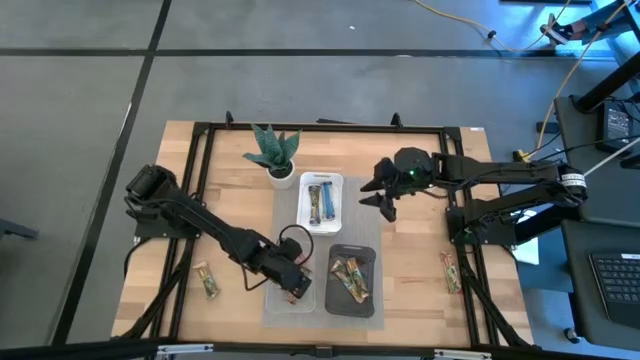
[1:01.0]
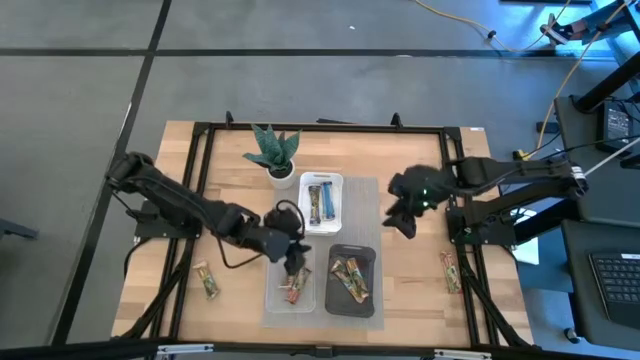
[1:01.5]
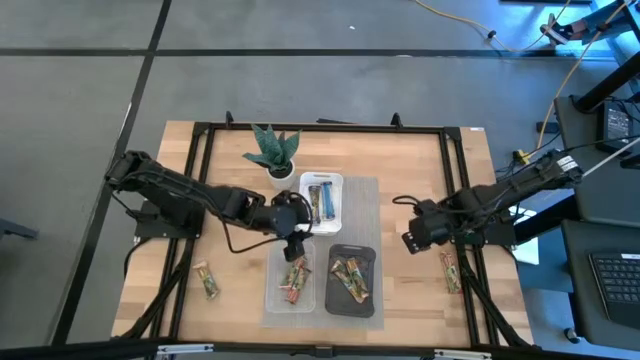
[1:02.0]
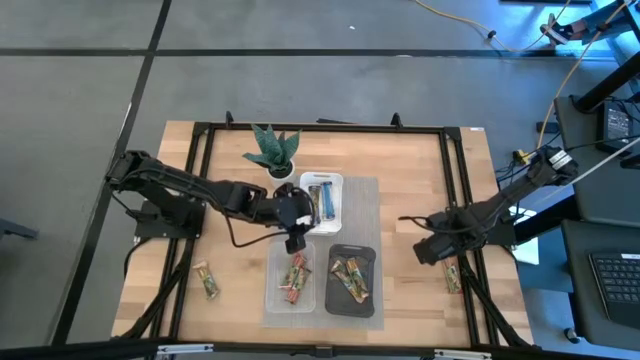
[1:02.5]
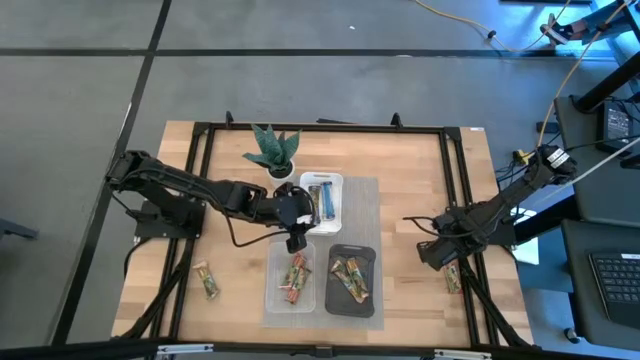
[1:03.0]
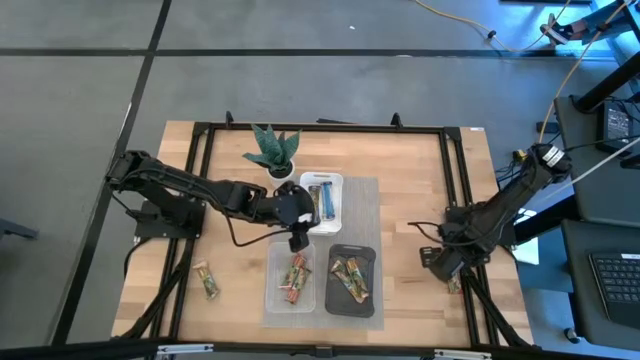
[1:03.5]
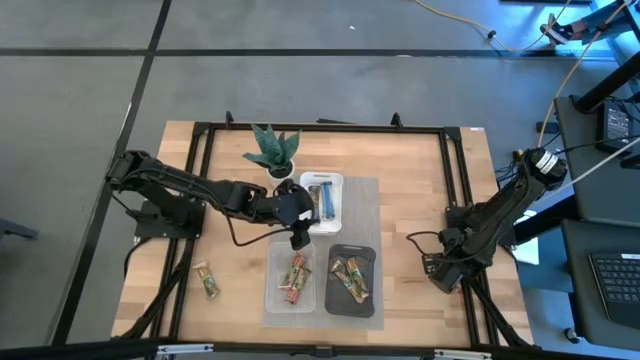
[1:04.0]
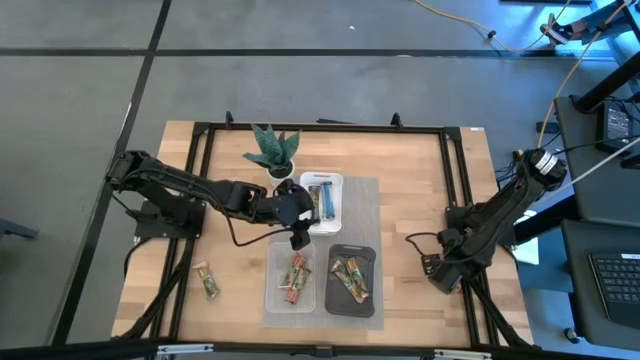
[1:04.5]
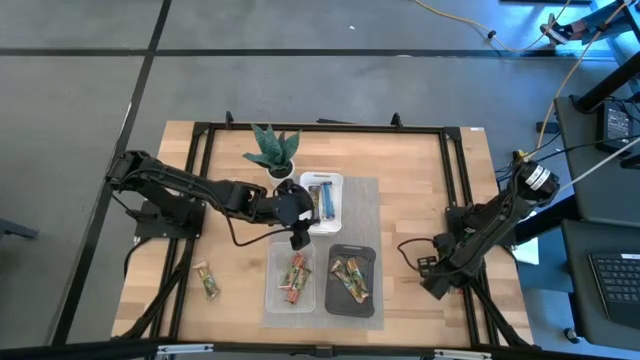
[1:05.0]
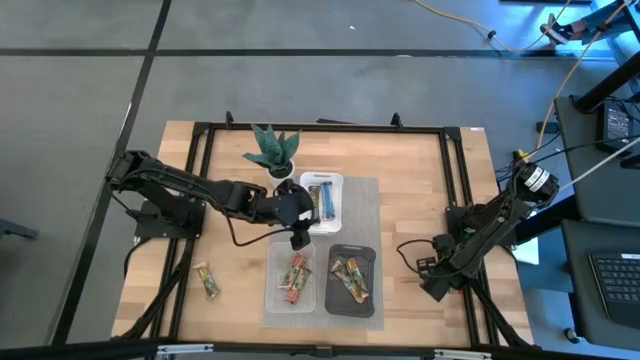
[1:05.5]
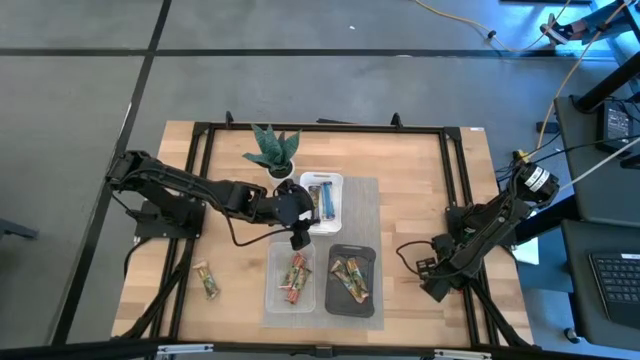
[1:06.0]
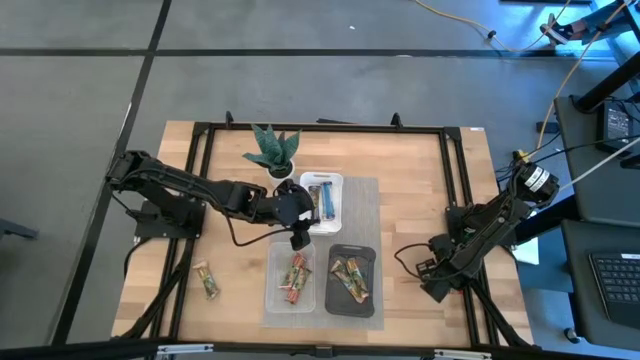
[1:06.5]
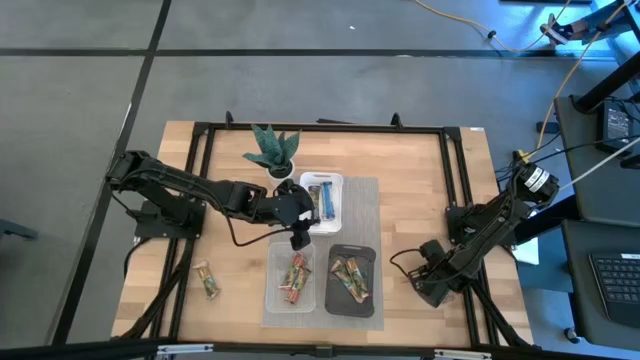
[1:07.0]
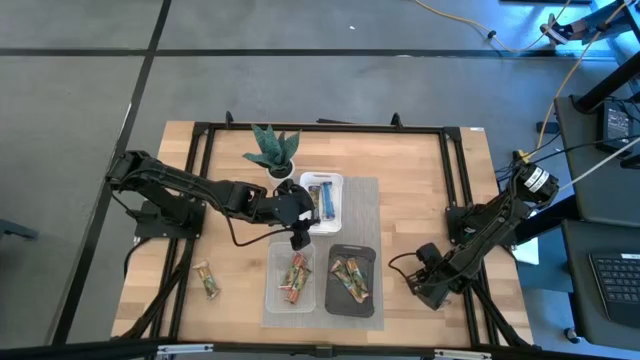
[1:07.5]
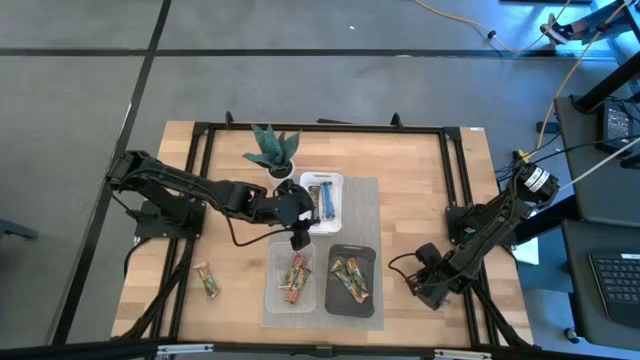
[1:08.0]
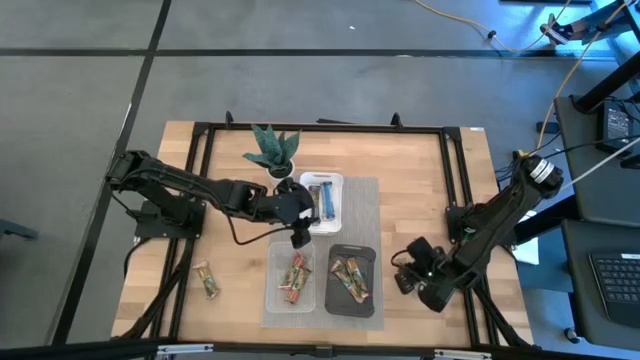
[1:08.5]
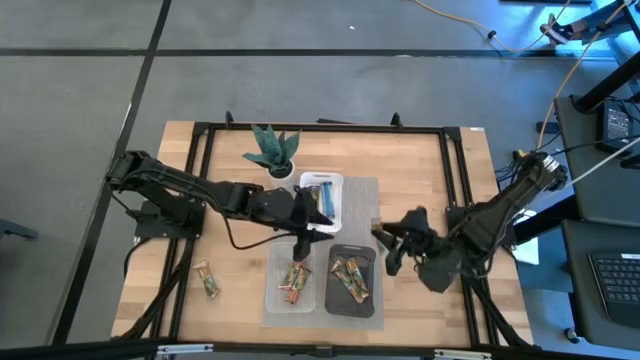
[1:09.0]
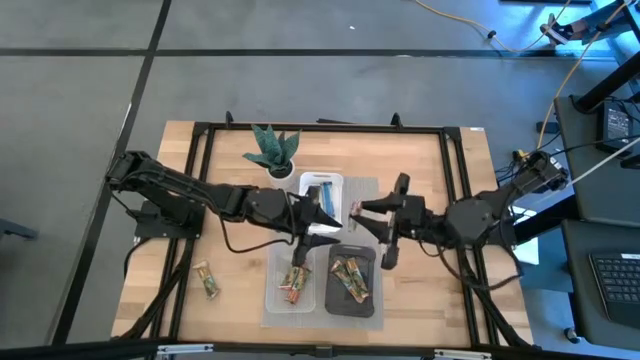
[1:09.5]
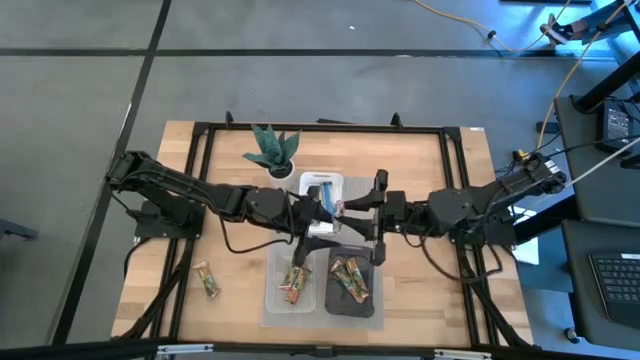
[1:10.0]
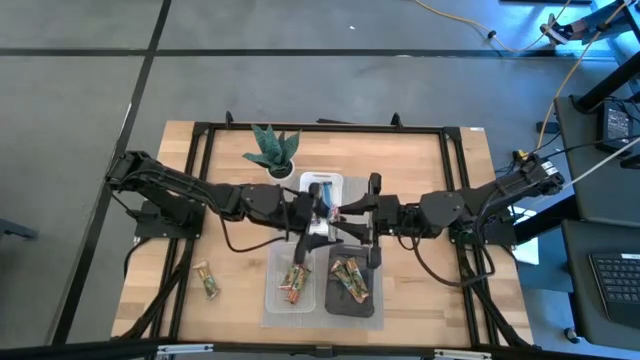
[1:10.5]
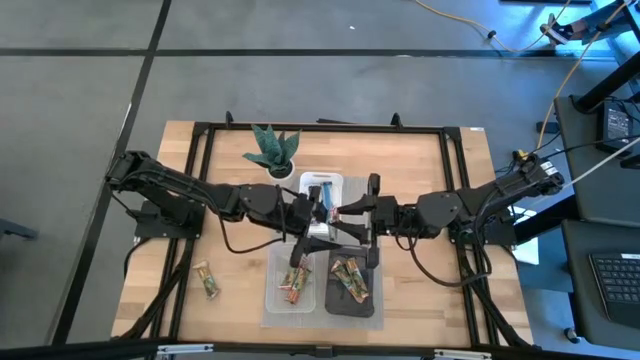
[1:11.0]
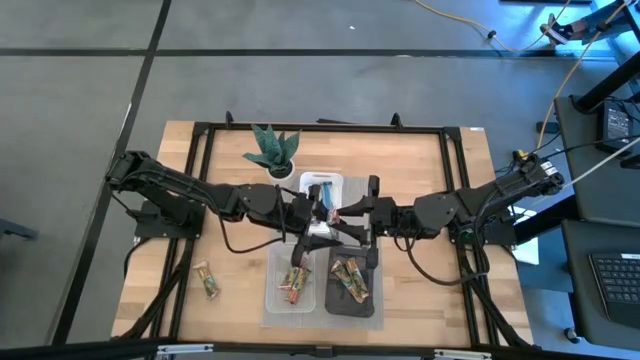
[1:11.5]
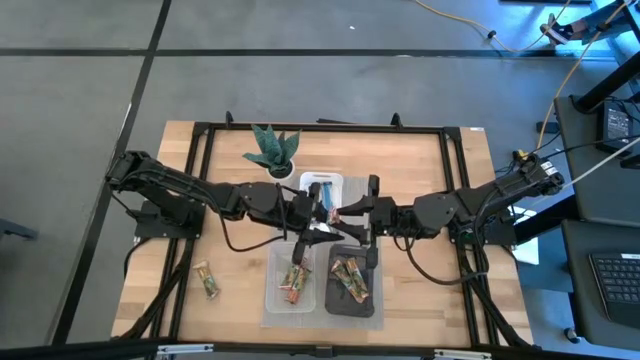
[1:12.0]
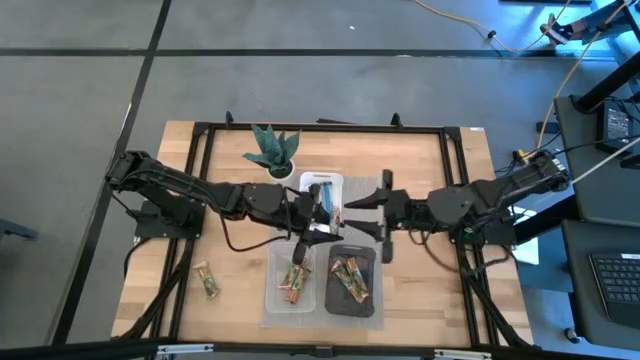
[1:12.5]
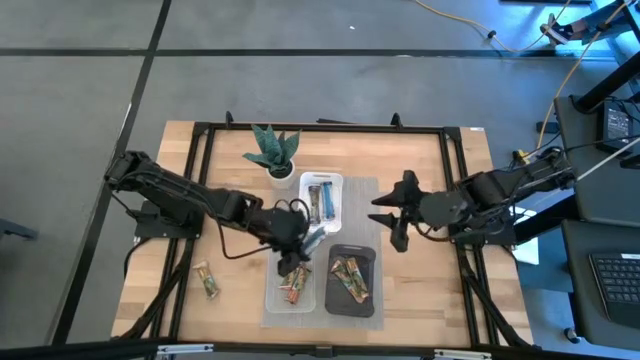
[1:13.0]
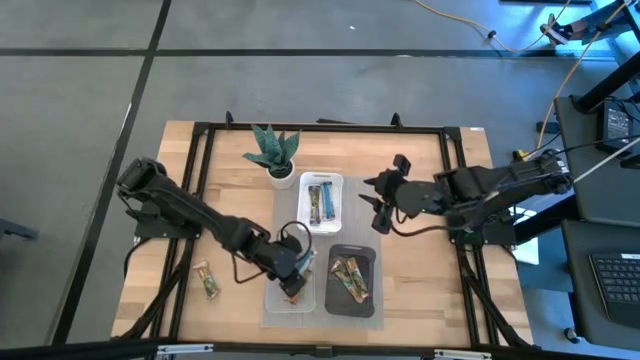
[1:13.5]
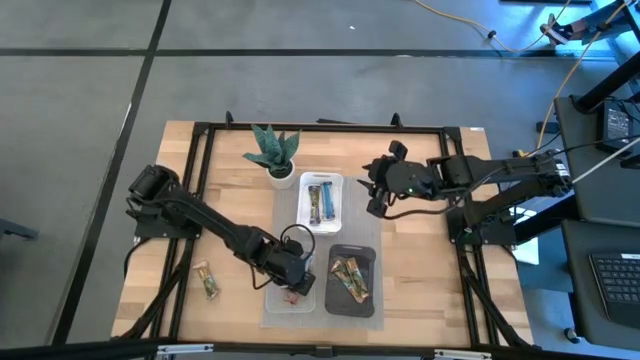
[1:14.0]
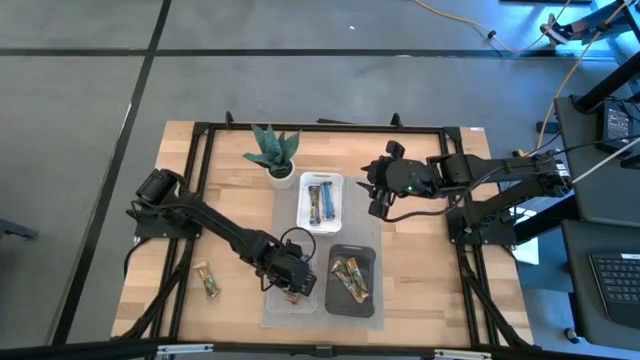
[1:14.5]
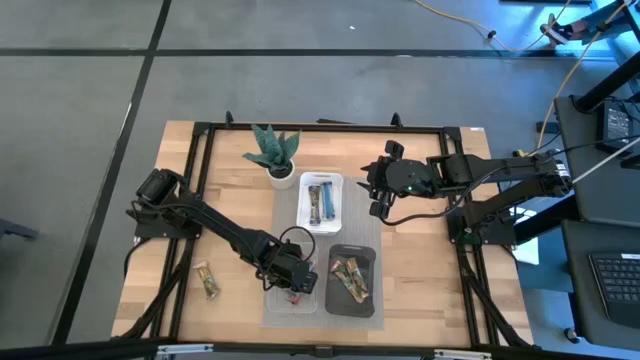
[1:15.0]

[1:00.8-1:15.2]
Task: Pick and place Granola Bars by type
Put the red granola bar into the transparent bin

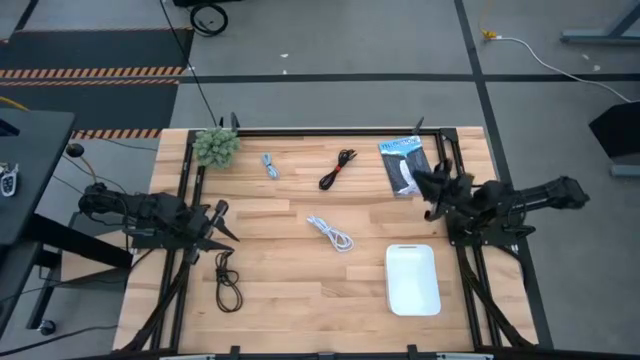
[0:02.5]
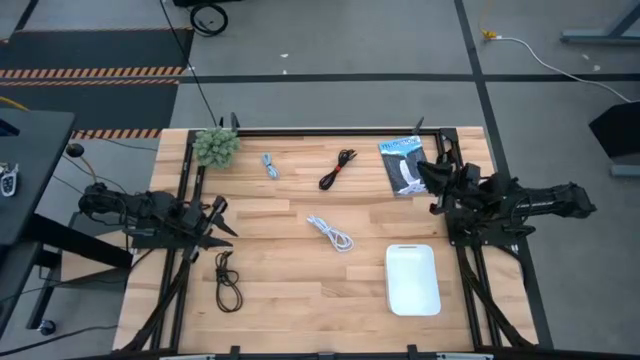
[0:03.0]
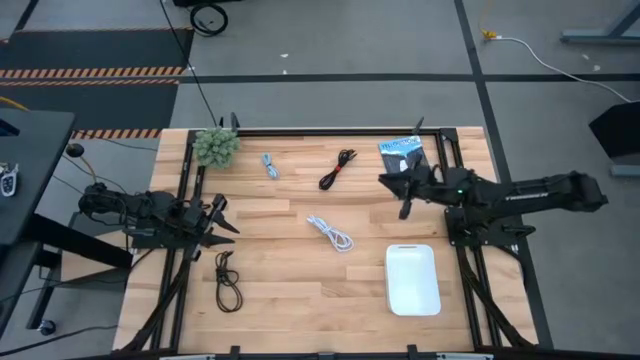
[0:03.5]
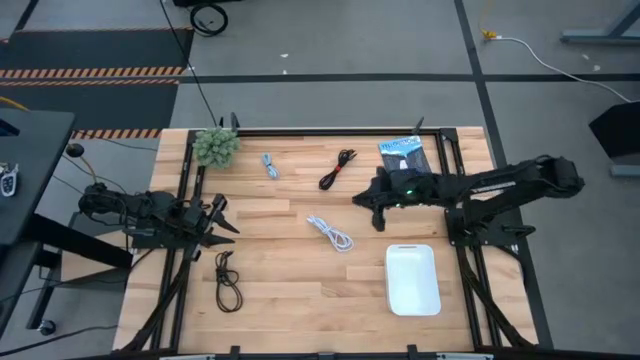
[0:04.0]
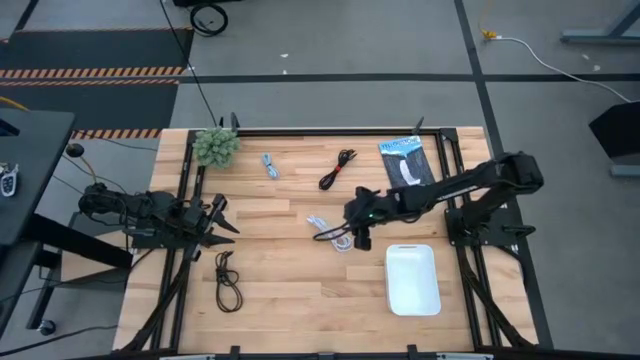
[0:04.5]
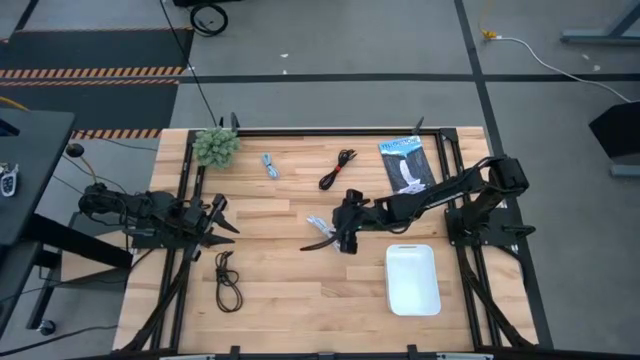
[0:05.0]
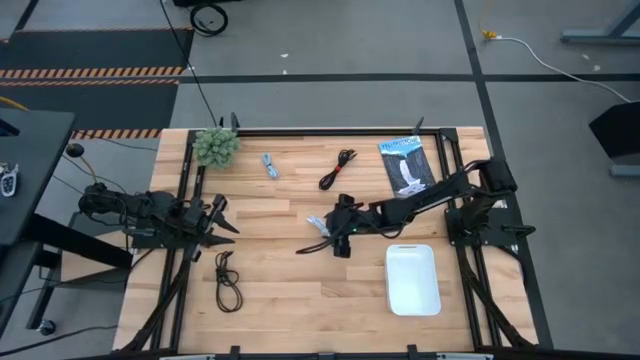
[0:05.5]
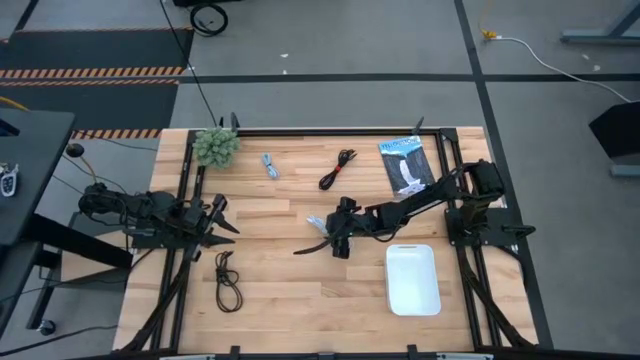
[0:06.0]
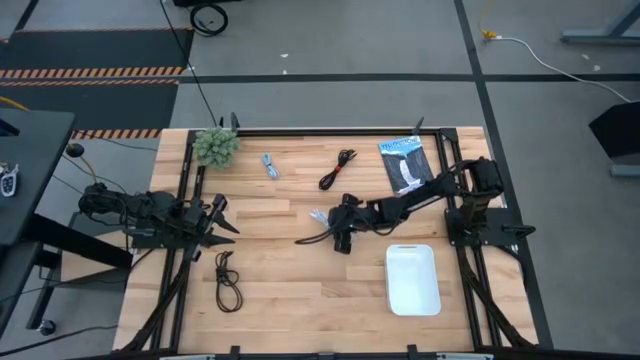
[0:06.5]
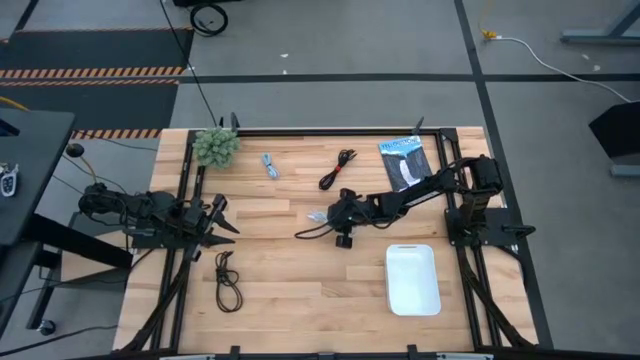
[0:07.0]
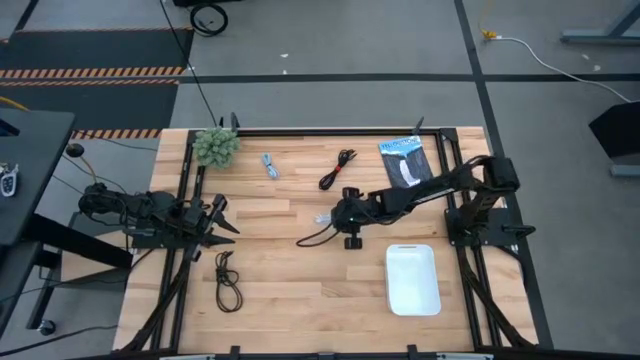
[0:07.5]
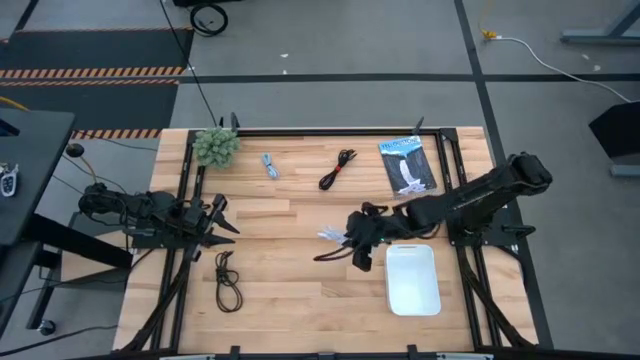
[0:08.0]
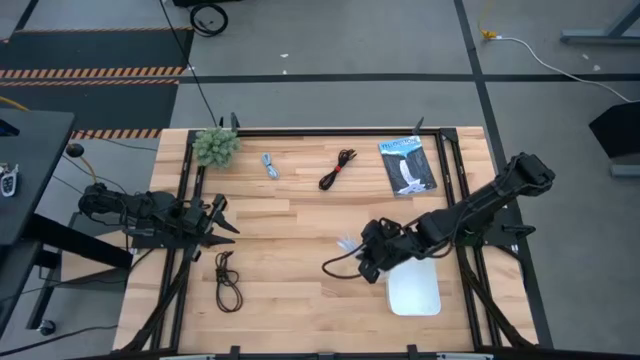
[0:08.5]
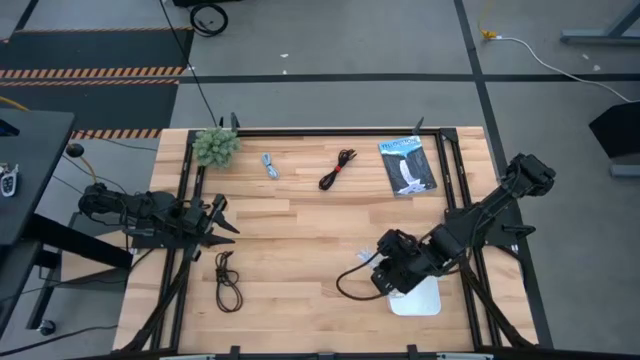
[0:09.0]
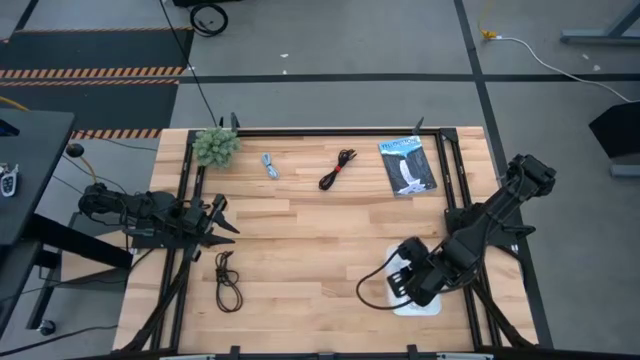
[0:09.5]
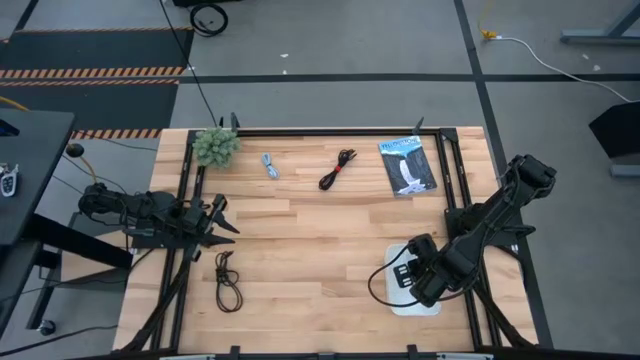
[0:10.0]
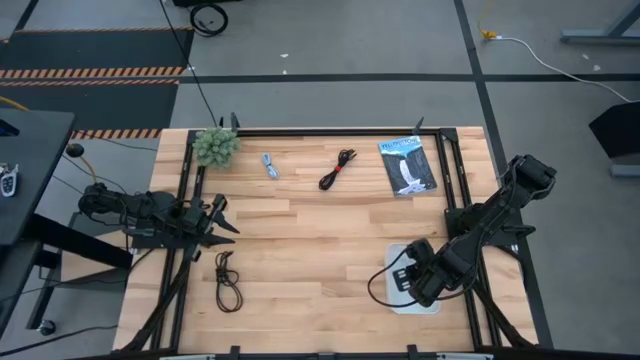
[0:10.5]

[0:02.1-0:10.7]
Task: Pick and place USB-C Cables
Put the white charger cable into the white bin
